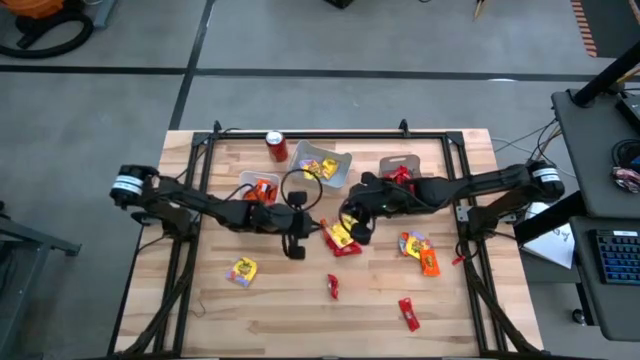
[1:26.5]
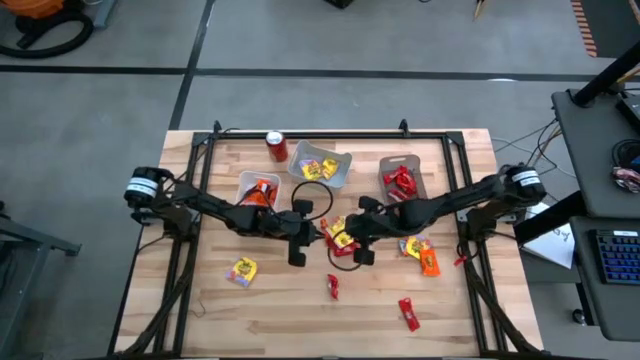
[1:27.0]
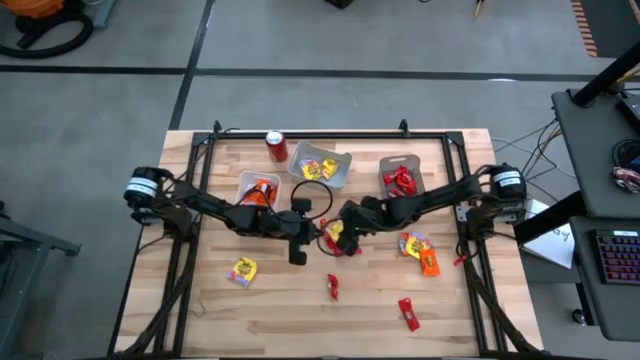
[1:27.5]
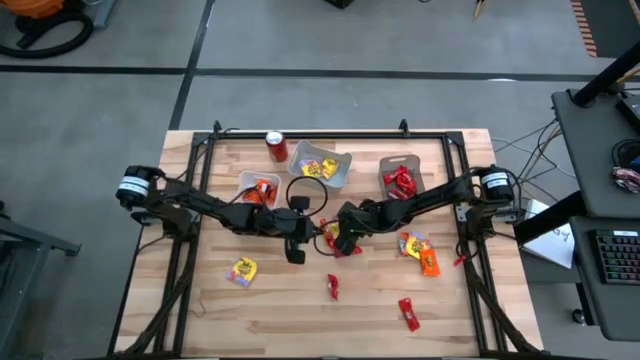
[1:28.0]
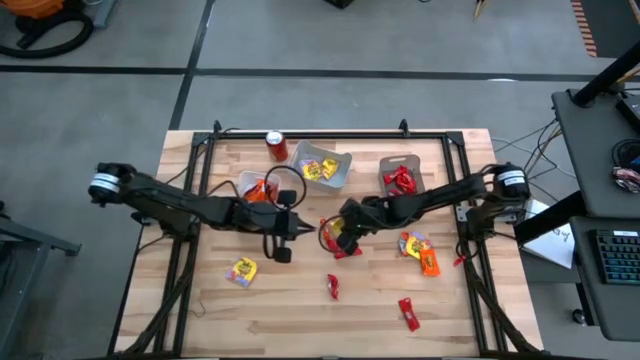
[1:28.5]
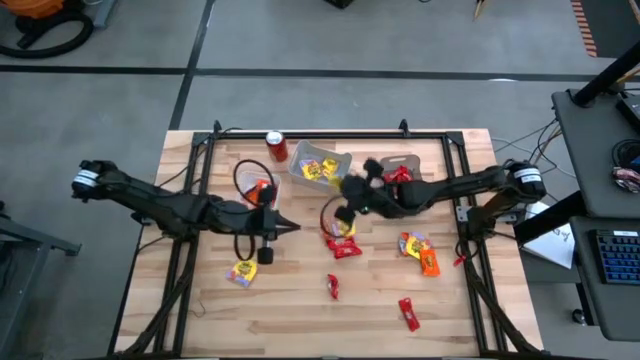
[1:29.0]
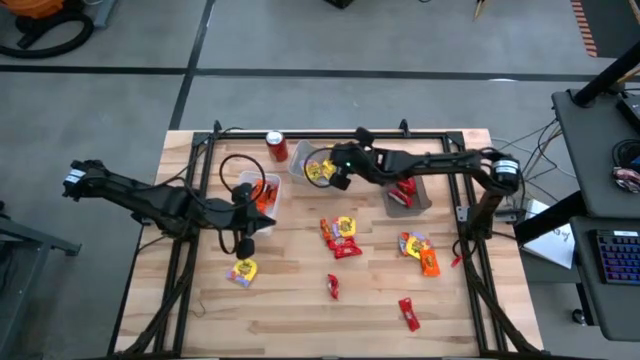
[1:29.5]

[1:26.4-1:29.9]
Task: Sort candy
Put the yellow candy into the gray bin

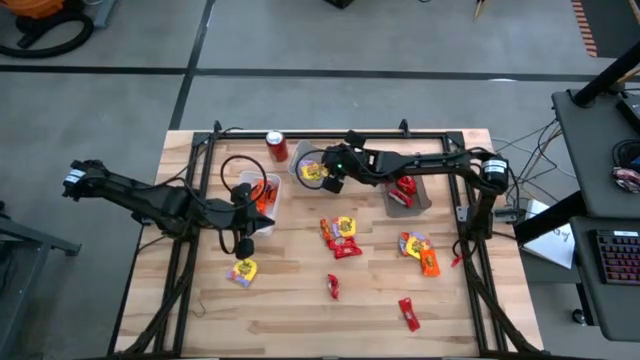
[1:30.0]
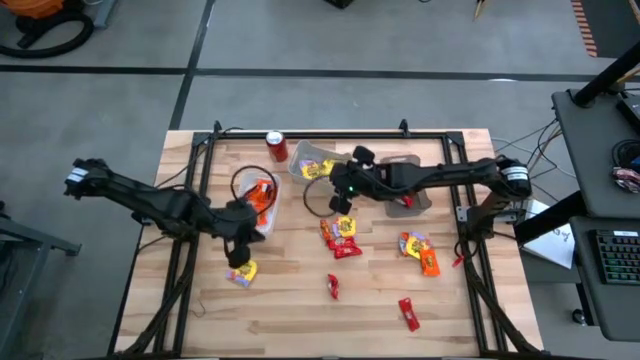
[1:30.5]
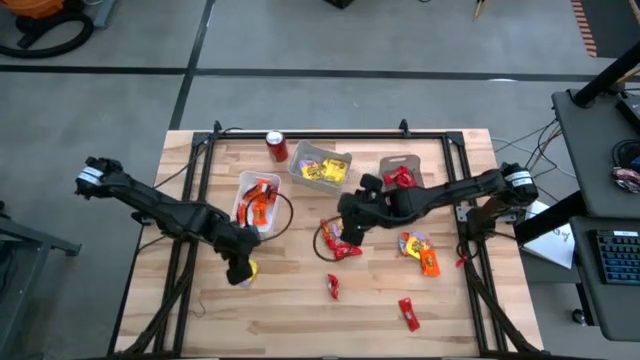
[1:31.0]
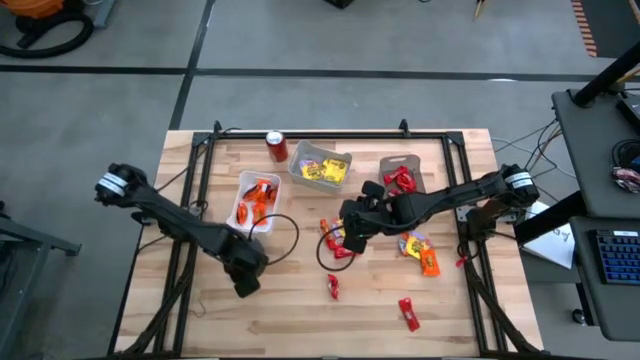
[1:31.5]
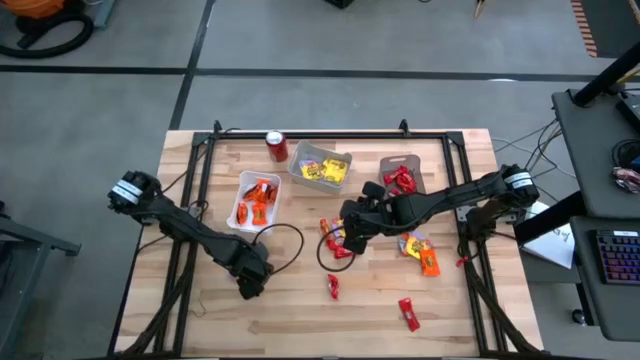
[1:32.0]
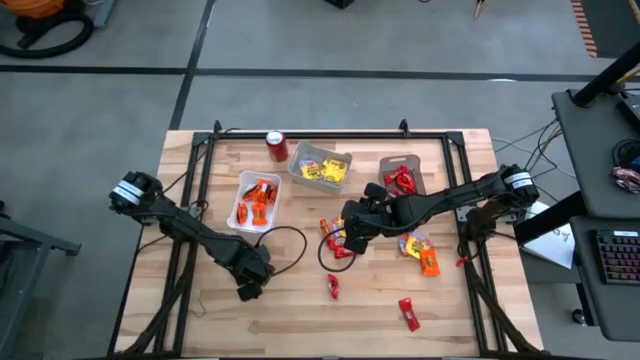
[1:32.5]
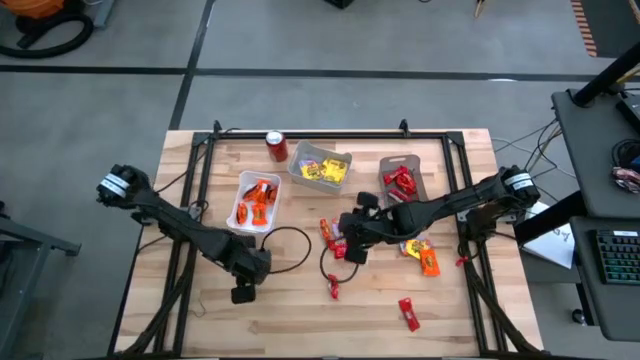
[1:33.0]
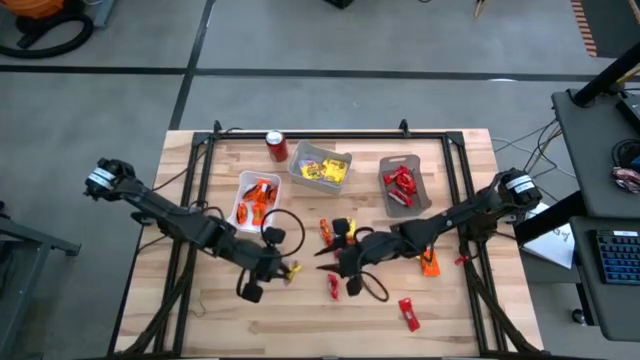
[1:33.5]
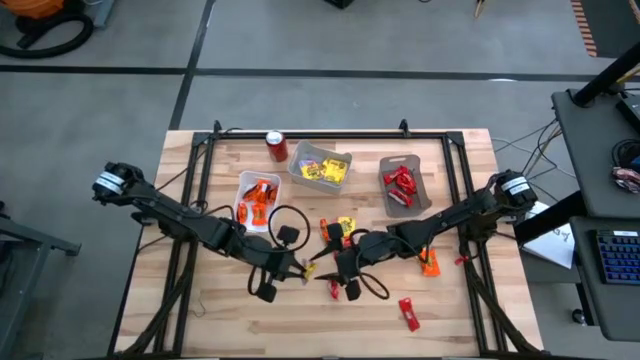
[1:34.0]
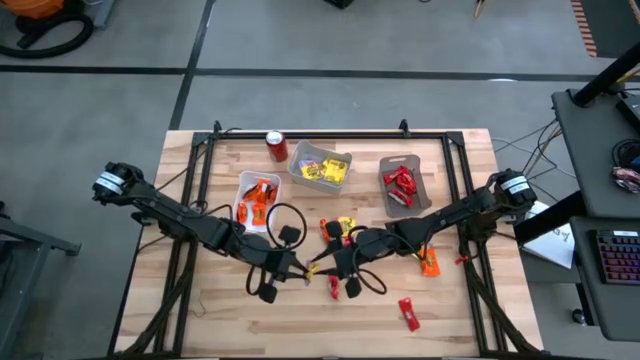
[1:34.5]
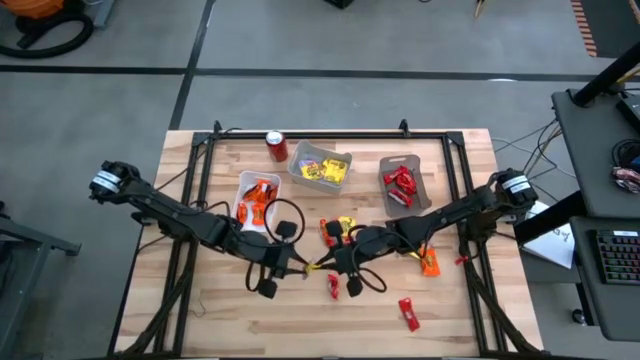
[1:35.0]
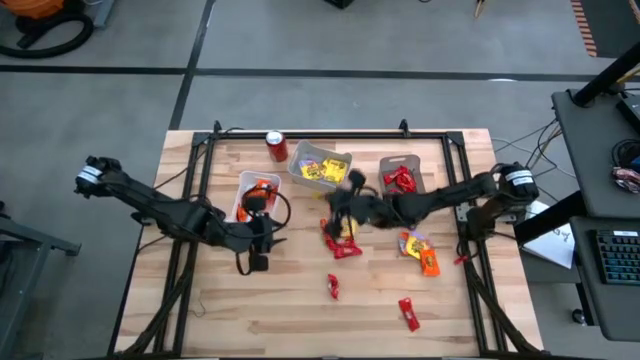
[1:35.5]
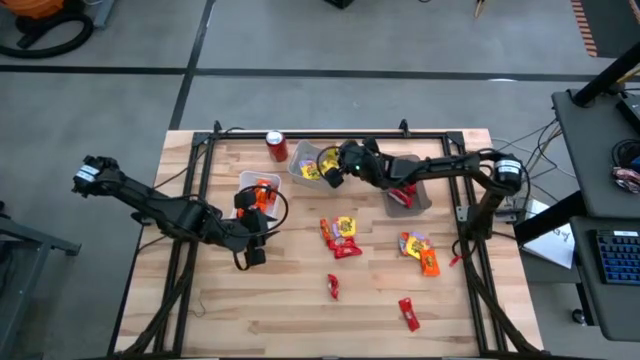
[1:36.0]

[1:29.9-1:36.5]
Put the yellow candy into the gray bin

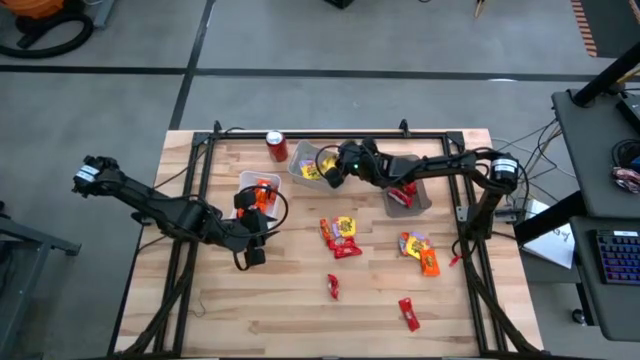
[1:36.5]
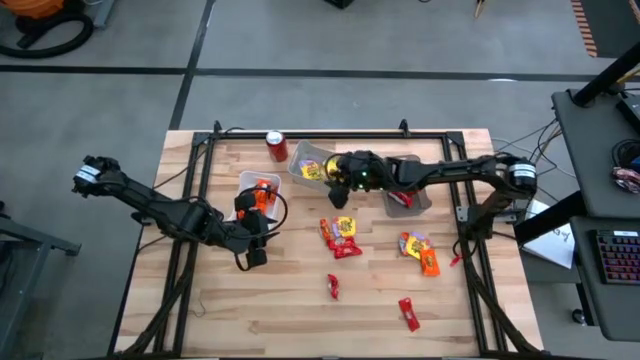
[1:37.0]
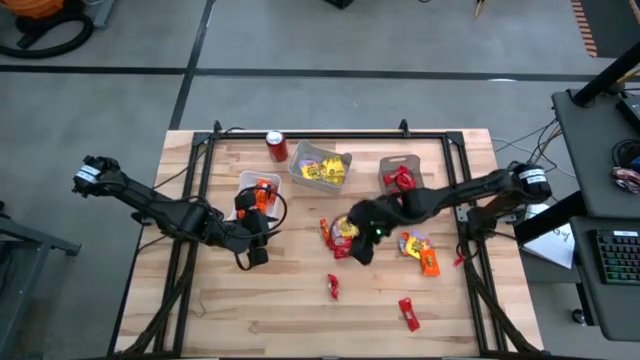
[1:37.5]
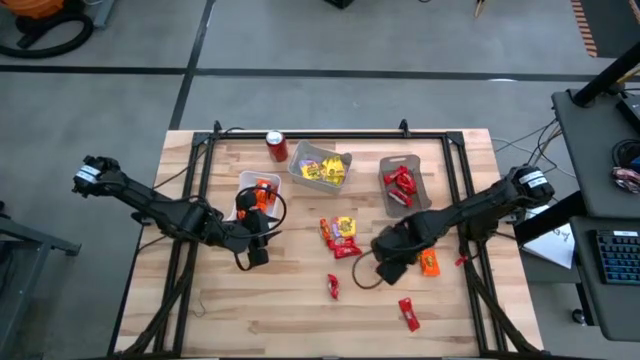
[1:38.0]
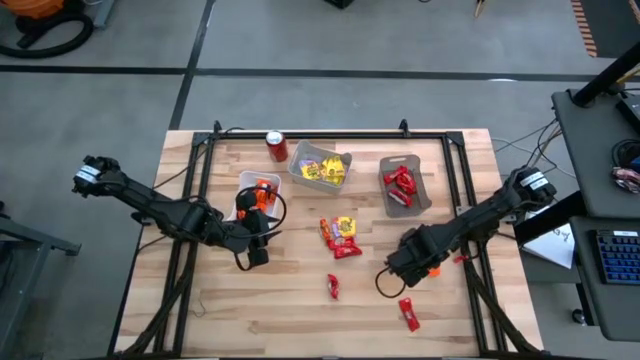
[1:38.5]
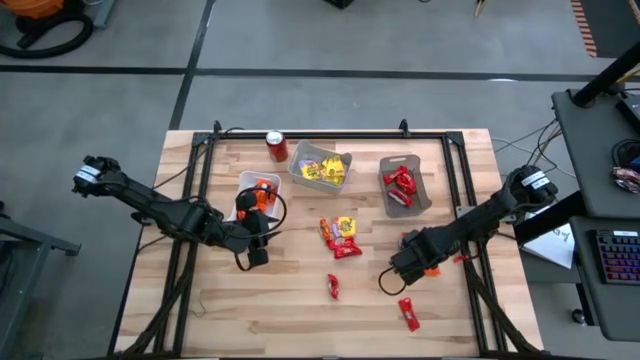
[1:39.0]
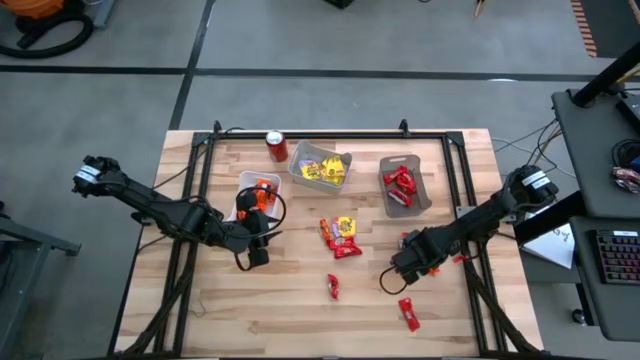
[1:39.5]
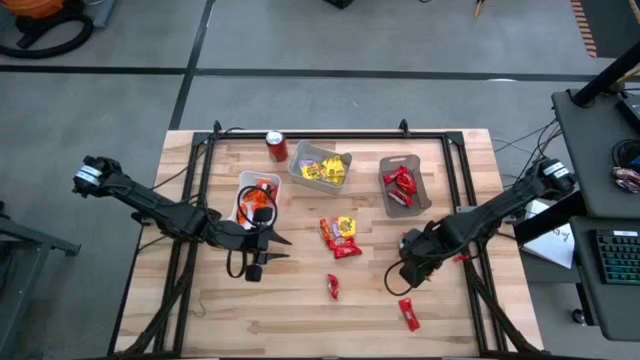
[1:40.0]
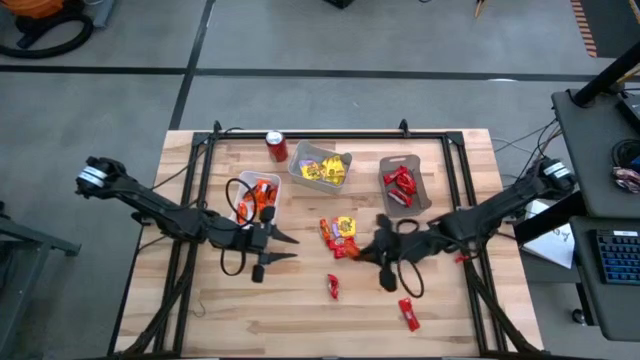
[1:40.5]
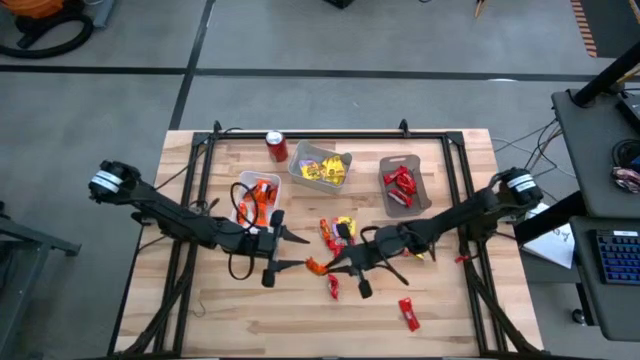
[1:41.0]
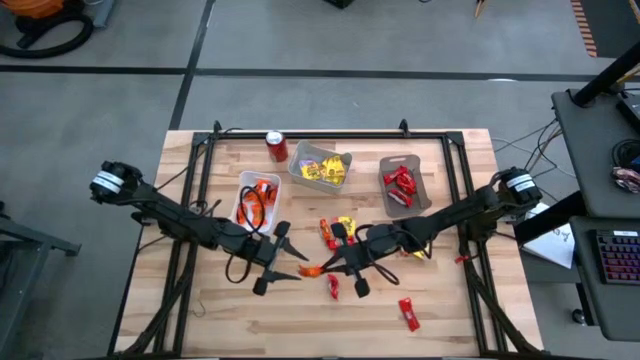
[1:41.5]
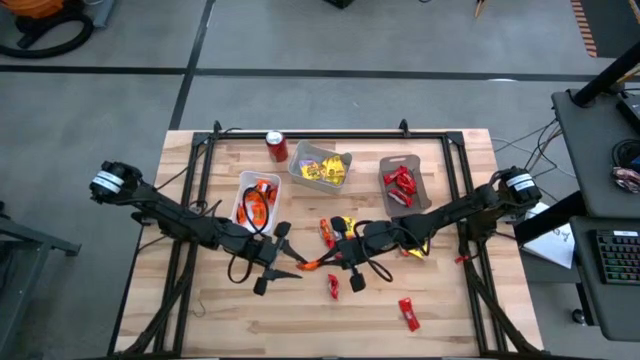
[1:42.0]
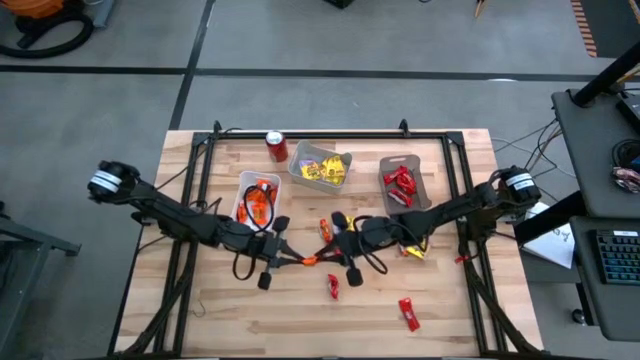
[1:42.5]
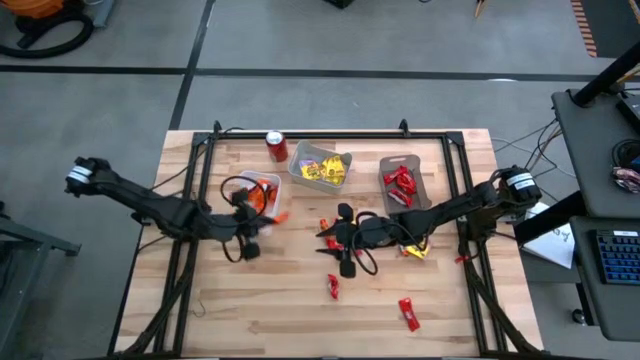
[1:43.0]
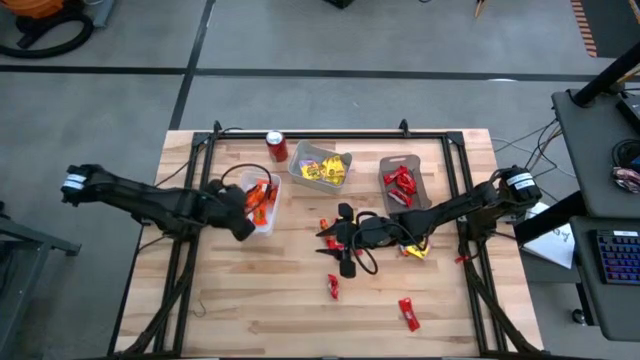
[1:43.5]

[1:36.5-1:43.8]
Put the orange chocolate into the white bin

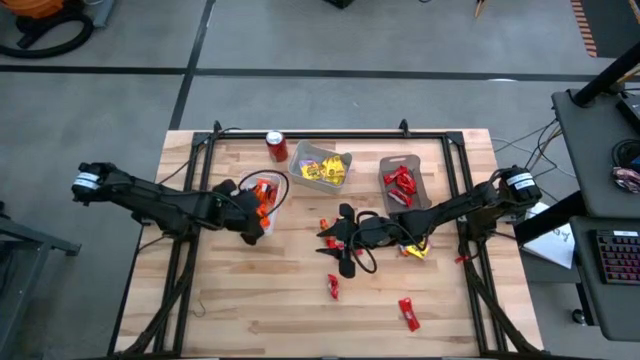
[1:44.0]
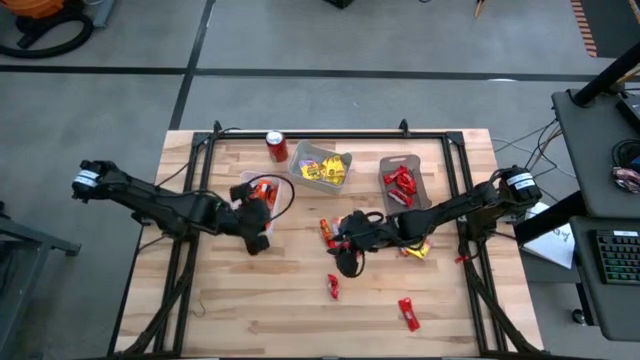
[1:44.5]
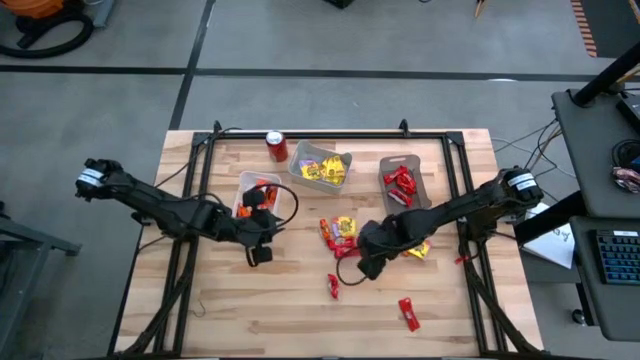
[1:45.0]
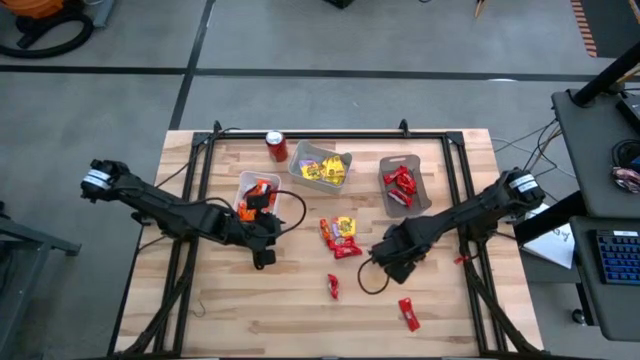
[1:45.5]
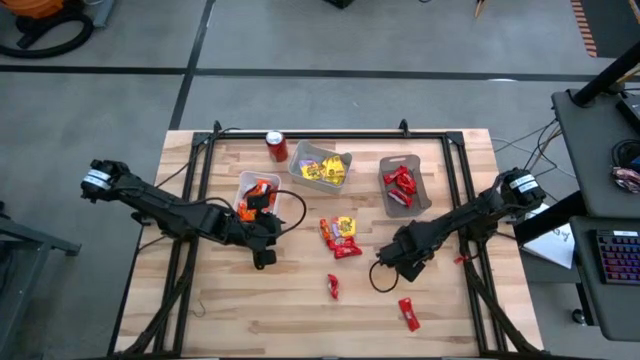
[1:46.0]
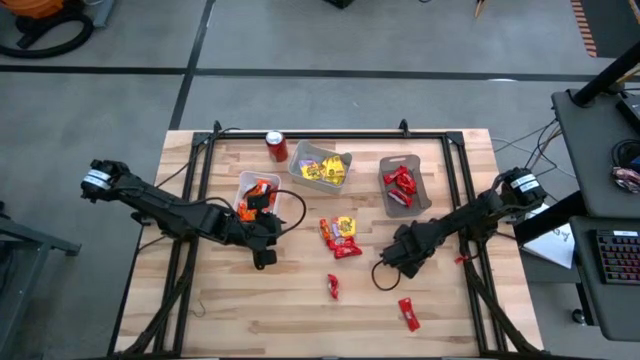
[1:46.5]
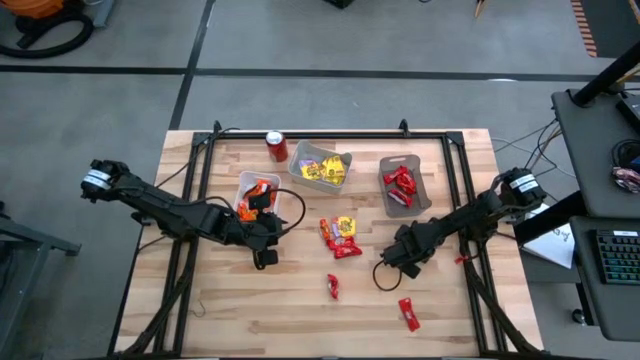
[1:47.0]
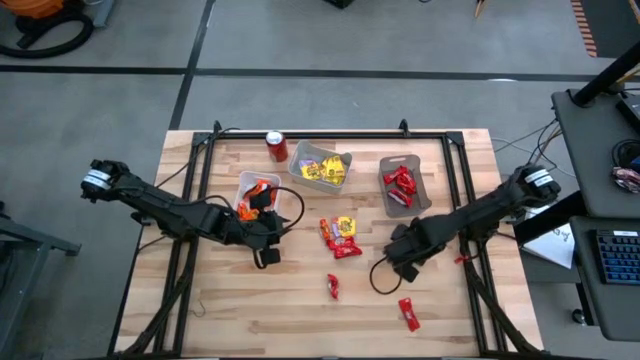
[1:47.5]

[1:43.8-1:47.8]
Put the yellow candy into the gray bin
